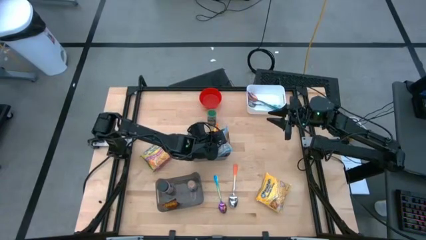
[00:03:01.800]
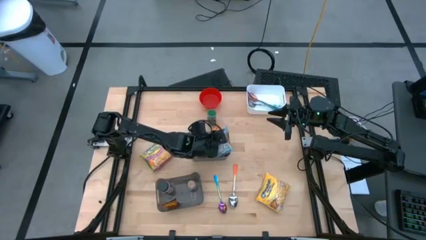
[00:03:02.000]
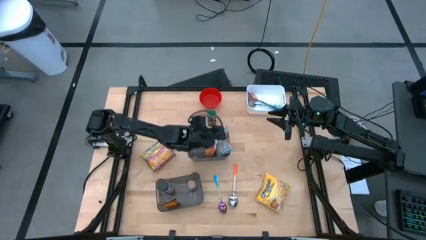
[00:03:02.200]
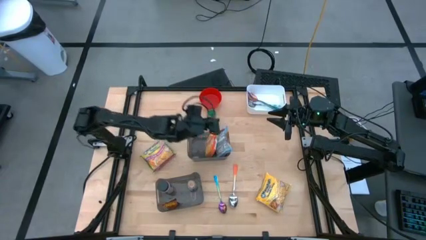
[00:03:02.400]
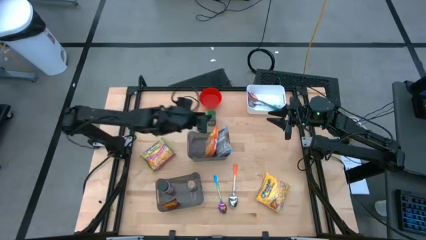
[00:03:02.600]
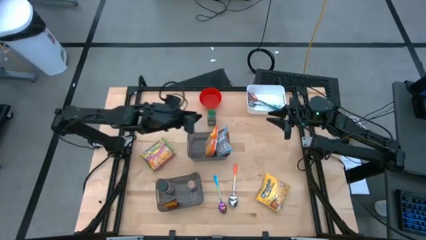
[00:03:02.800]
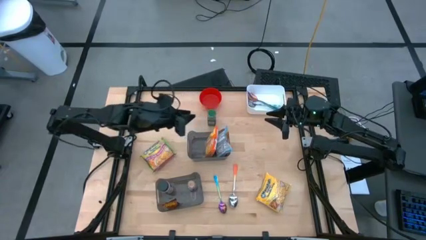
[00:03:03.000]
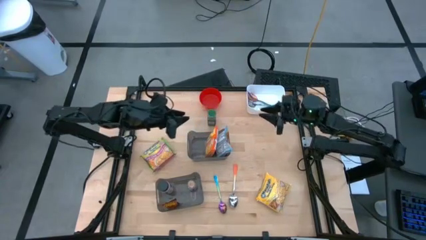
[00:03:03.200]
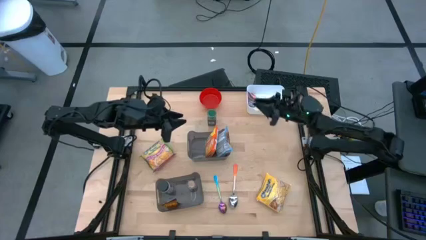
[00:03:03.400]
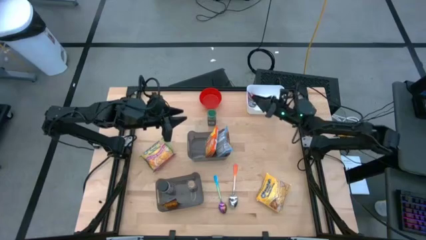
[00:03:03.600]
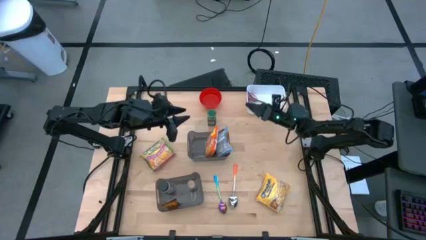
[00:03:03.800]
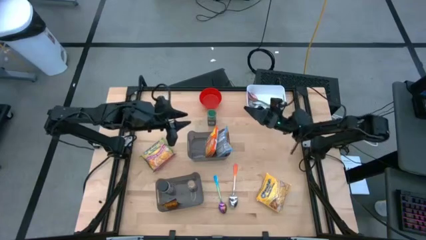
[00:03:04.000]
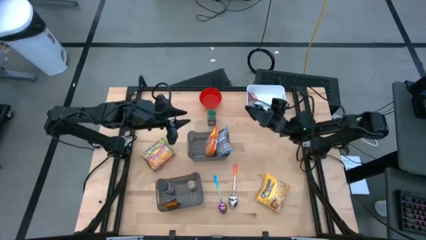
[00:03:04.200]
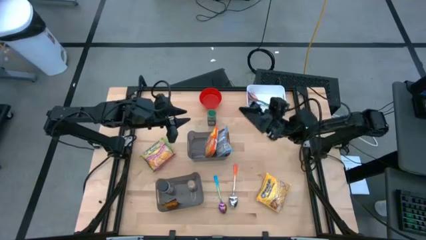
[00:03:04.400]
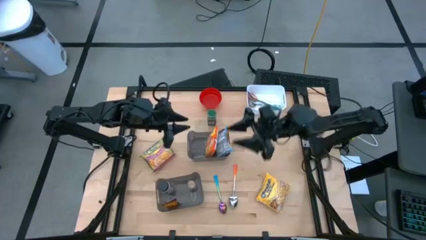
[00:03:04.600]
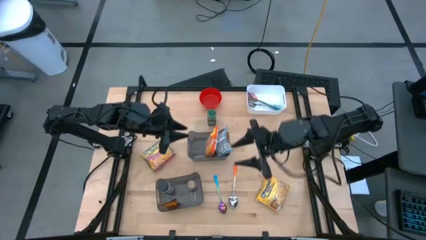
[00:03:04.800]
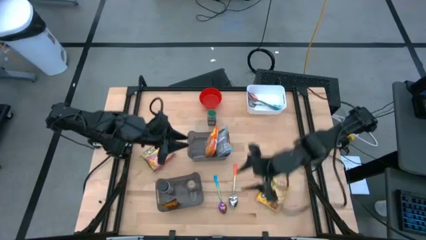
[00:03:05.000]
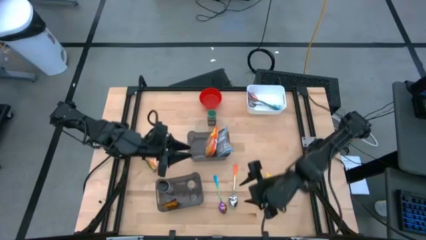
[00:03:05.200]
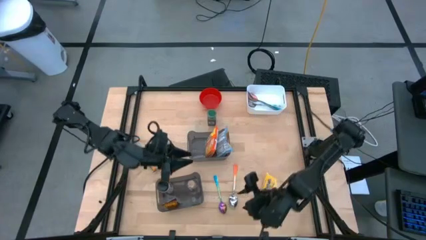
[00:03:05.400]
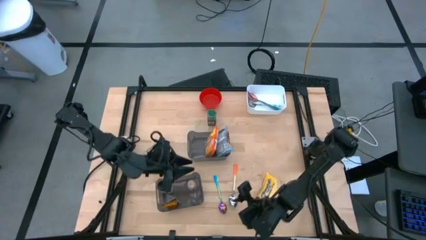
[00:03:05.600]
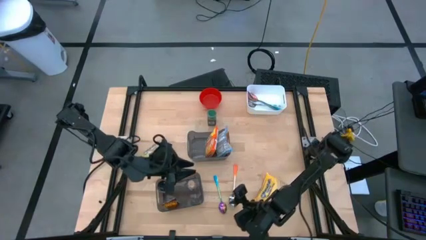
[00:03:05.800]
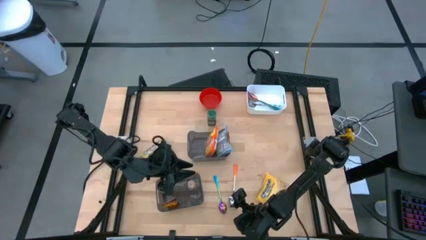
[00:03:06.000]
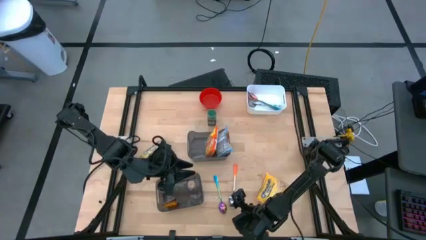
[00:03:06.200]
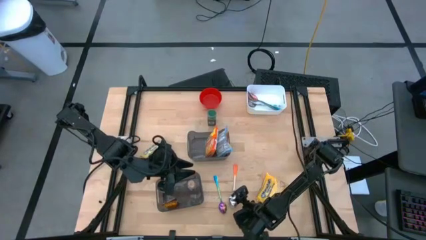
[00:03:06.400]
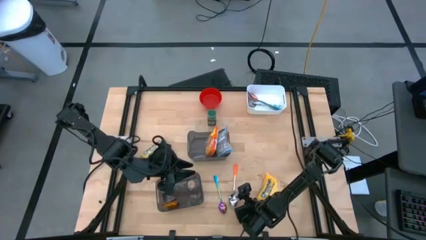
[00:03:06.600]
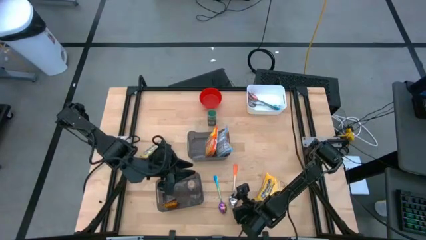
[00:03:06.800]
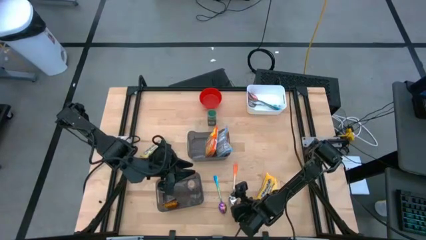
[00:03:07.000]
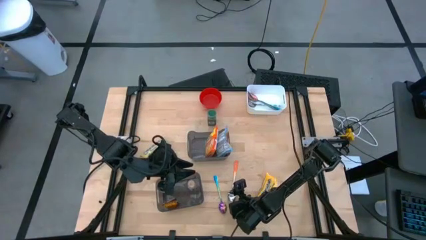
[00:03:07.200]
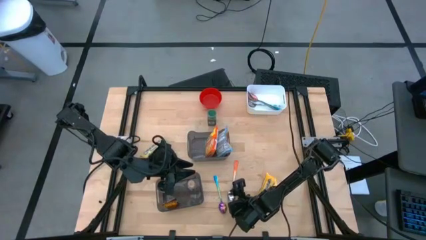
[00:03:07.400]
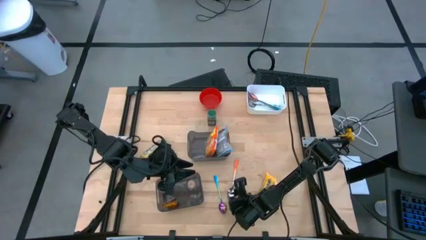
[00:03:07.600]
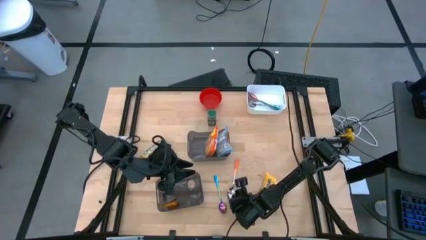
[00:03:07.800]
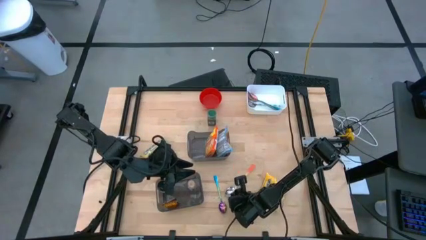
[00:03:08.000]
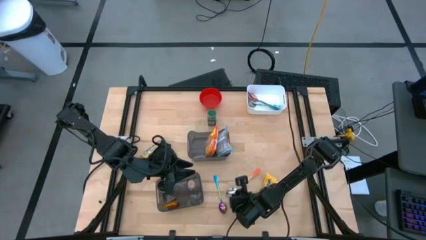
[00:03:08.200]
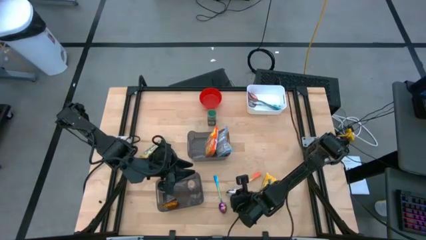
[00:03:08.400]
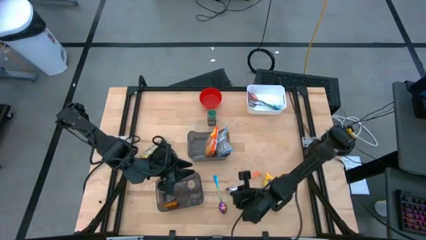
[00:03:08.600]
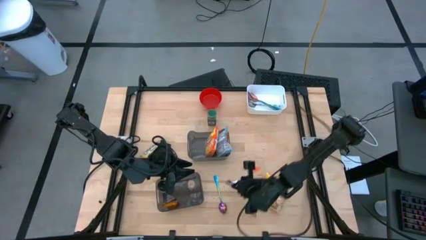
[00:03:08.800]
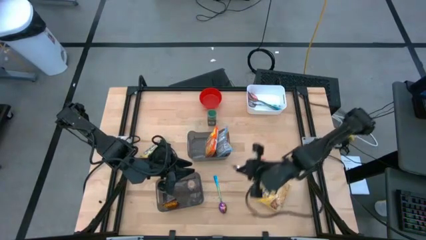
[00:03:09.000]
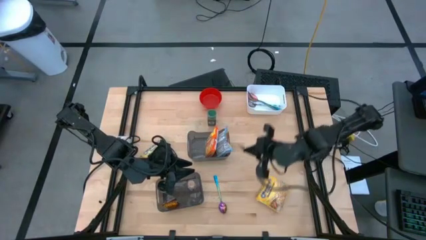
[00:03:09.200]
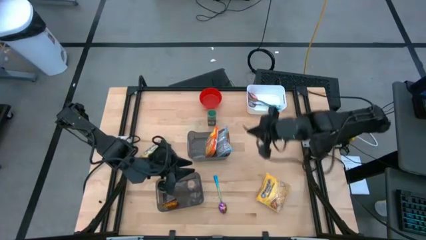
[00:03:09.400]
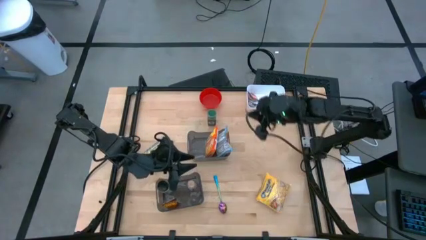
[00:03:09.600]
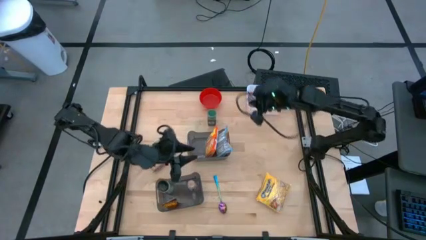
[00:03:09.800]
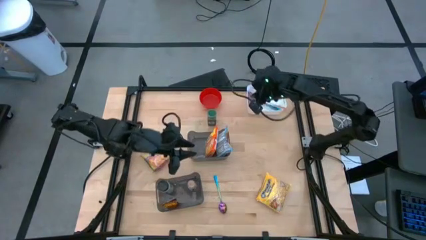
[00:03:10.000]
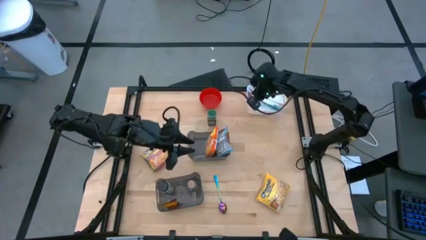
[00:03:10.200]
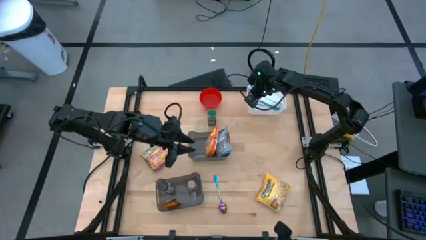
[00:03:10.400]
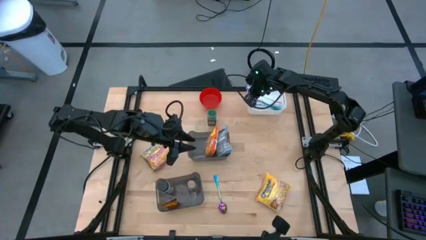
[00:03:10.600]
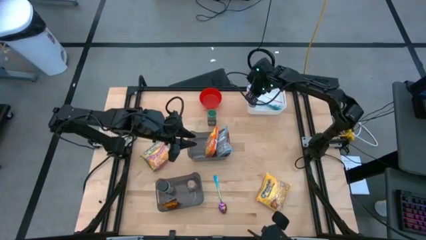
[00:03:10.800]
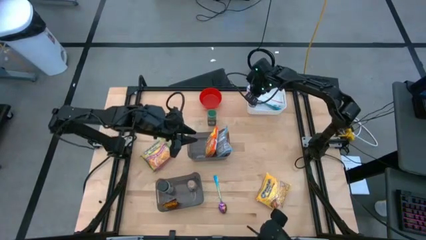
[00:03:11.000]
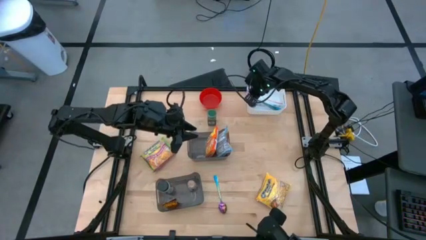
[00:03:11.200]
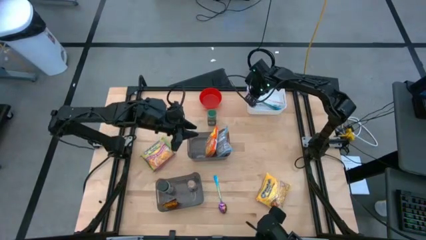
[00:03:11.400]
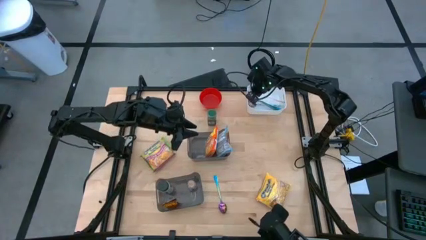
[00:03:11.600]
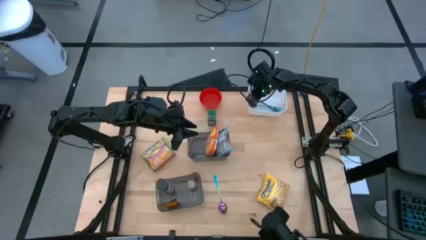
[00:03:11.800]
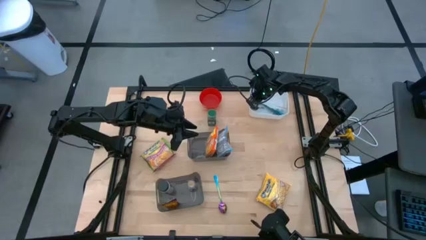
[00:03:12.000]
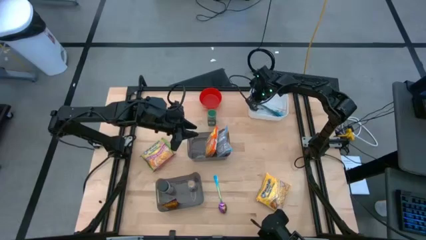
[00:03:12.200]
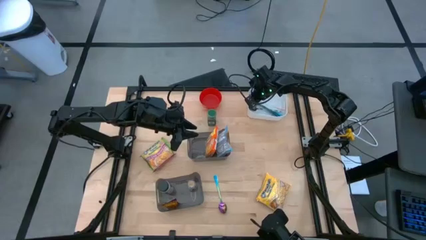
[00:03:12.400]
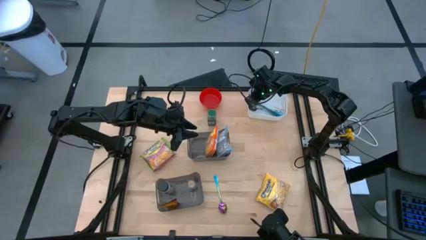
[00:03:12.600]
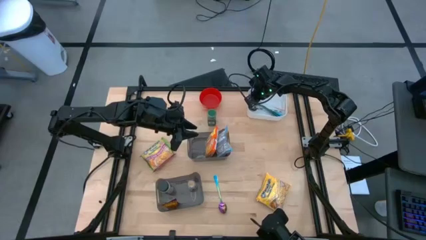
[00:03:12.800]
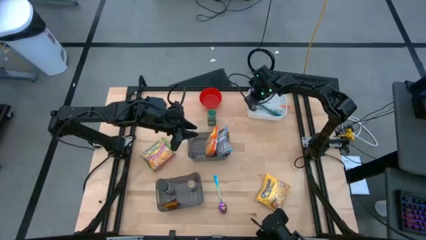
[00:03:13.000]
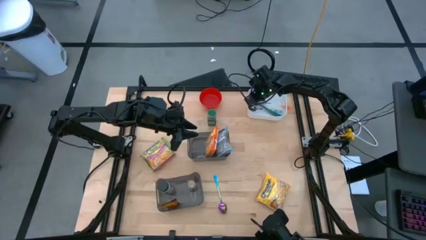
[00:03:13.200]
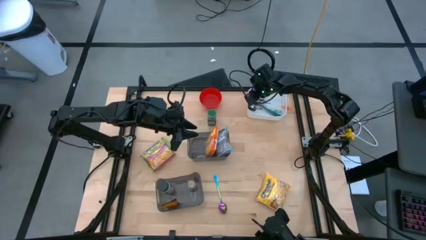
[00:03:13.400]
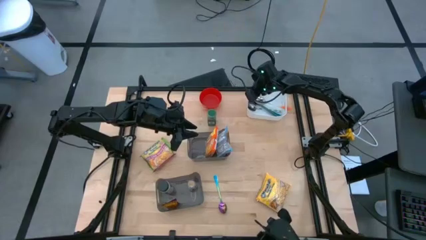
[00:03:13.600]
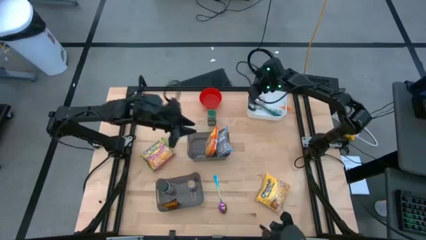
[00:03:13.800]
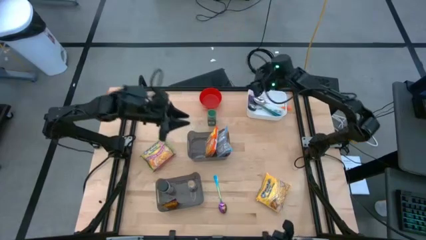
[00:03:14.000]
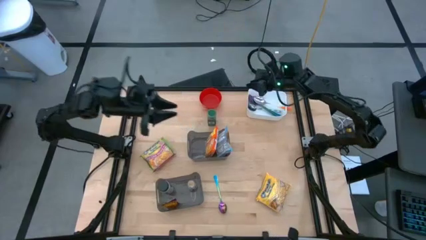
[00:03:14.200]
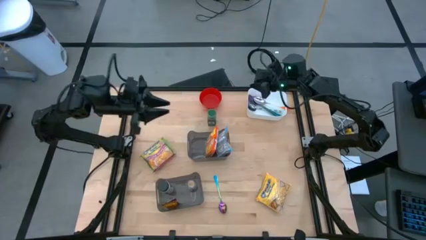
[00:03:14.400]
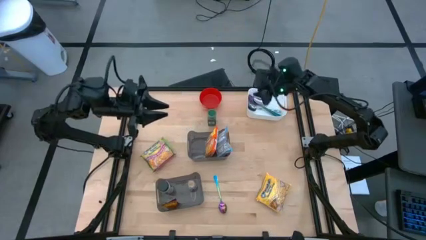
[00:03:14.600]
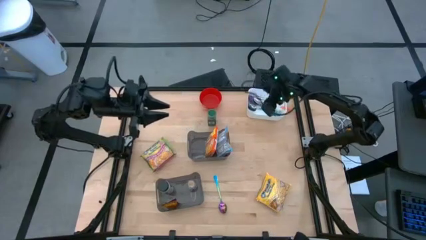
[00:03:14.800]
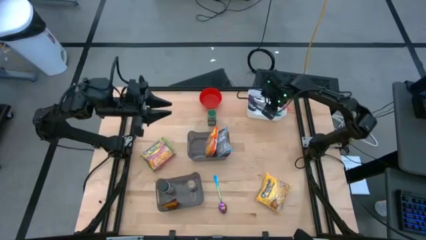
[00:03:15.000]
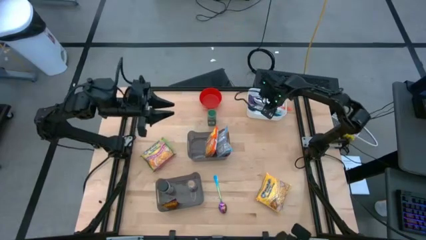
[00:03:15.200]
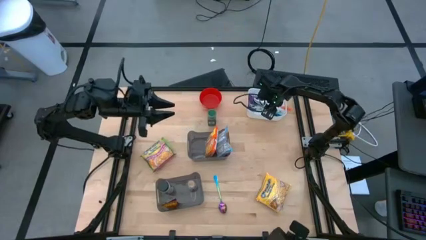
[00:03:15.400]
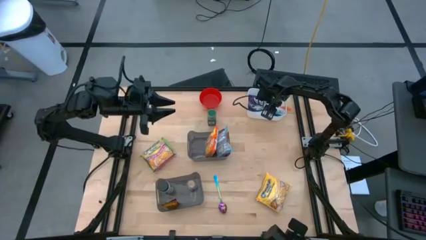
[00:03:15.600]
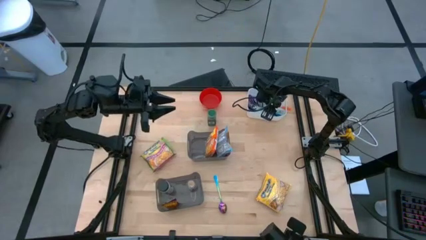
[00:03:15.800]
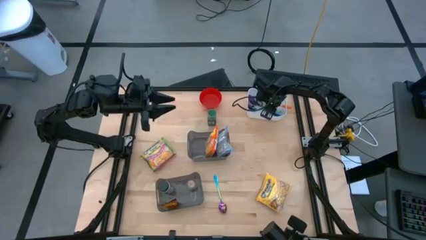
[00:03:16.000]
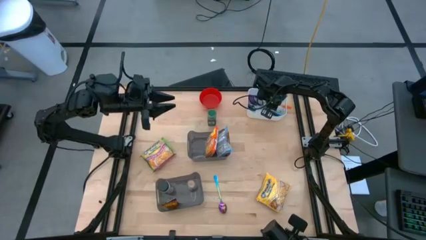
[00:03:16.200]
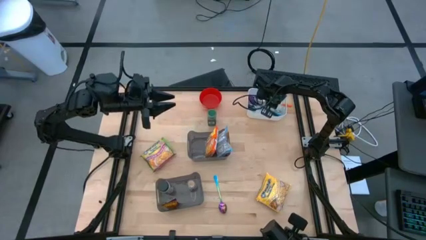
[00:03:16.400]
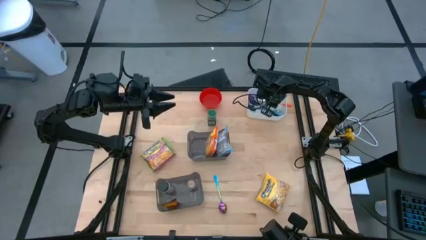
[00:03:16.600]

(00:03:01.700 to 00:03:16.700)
Task: Pick & Place Food Item
Put the orange spoon into the white bin
